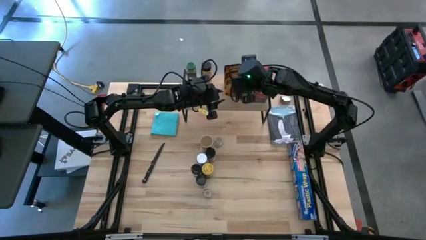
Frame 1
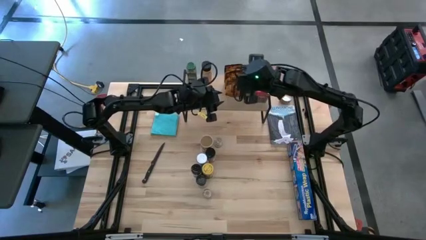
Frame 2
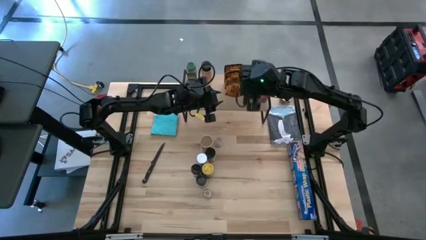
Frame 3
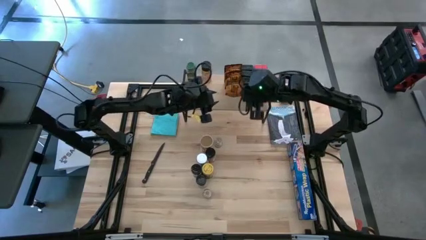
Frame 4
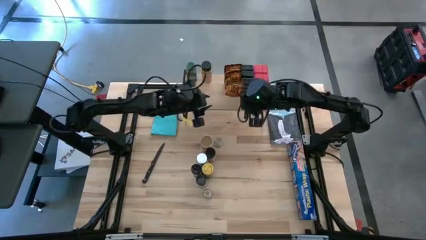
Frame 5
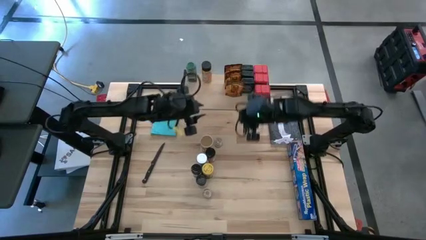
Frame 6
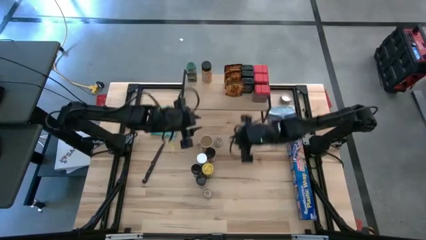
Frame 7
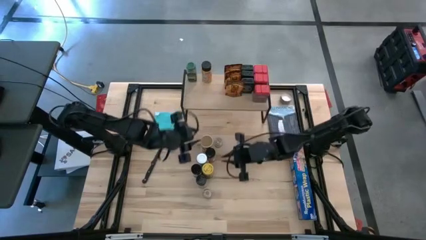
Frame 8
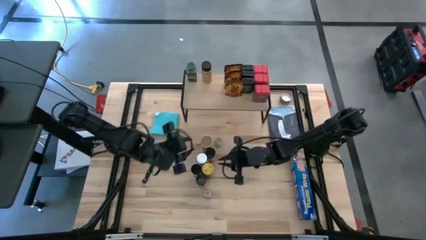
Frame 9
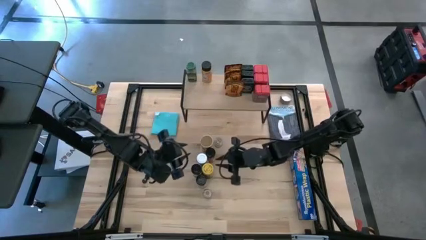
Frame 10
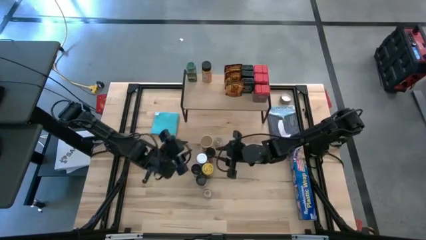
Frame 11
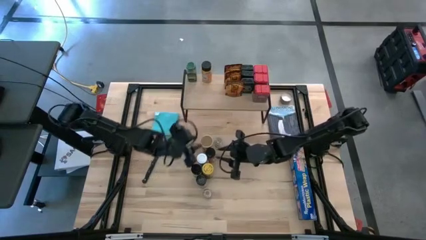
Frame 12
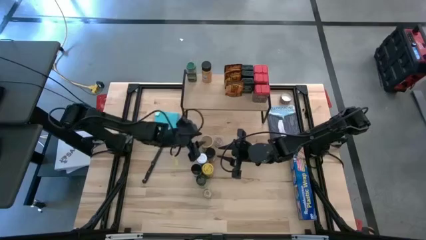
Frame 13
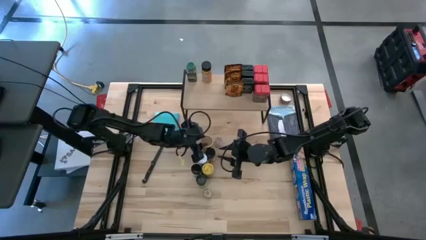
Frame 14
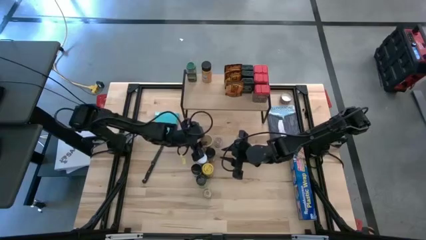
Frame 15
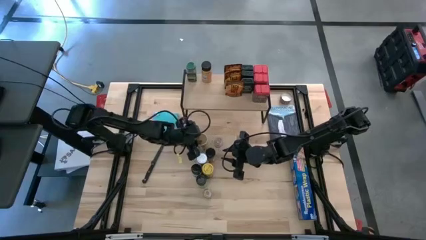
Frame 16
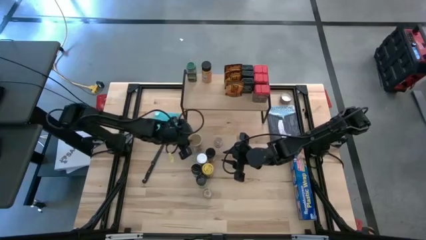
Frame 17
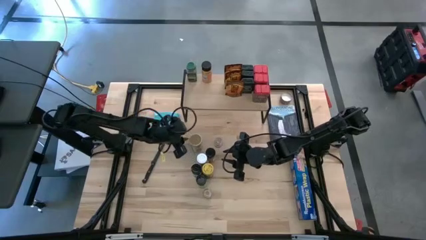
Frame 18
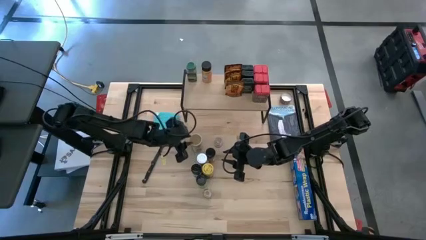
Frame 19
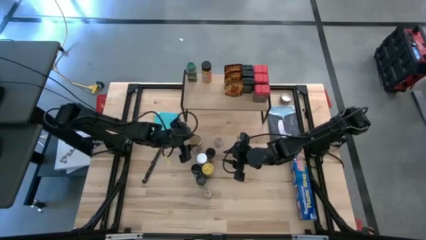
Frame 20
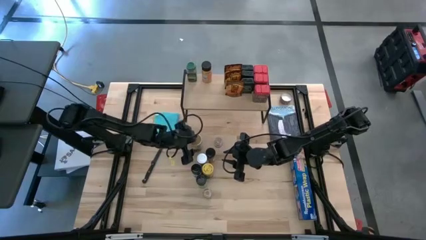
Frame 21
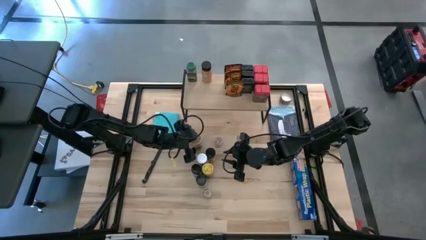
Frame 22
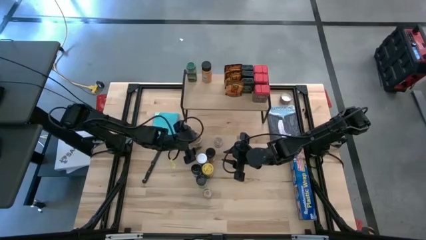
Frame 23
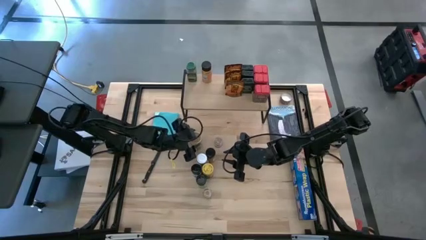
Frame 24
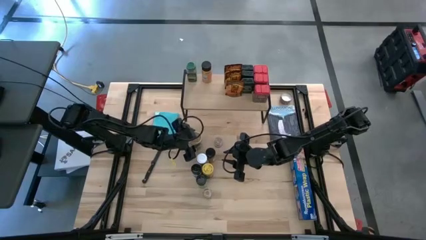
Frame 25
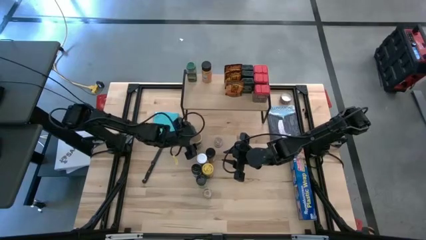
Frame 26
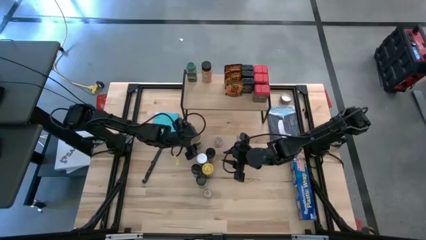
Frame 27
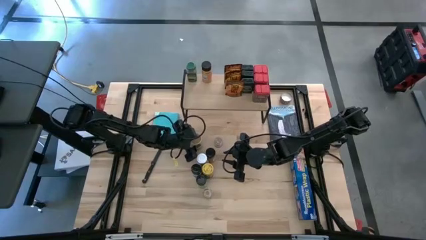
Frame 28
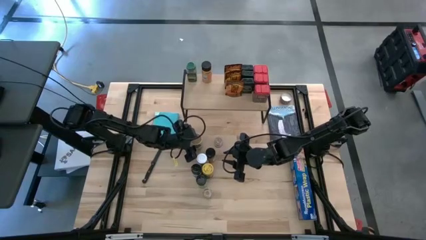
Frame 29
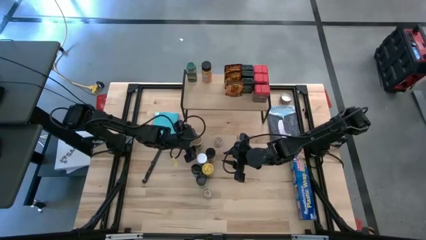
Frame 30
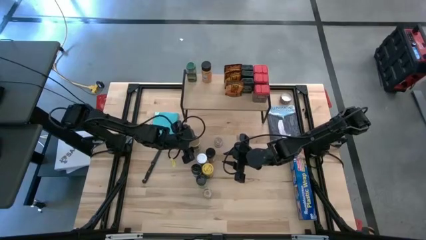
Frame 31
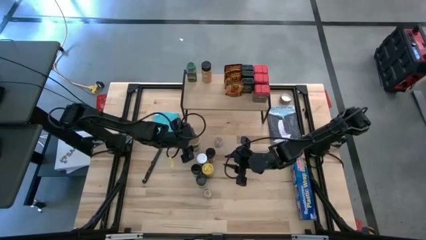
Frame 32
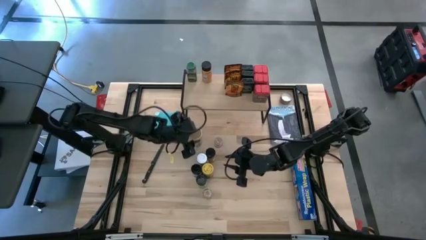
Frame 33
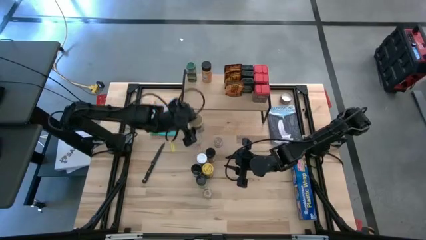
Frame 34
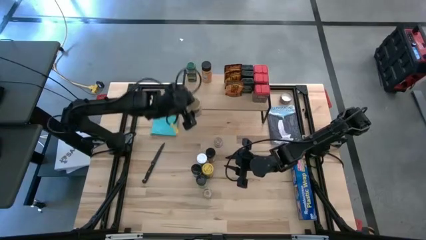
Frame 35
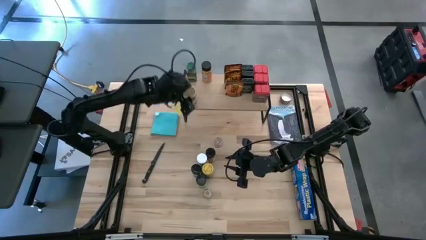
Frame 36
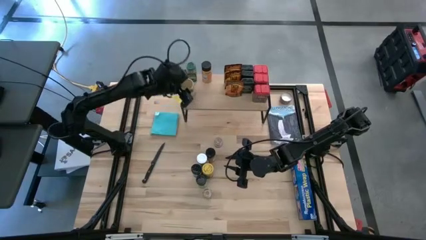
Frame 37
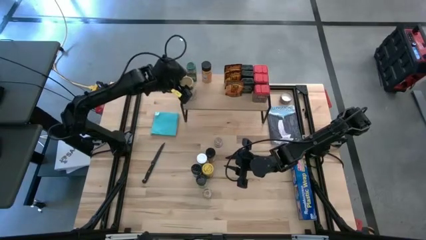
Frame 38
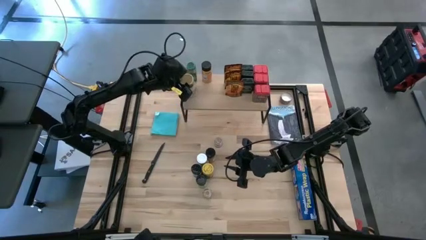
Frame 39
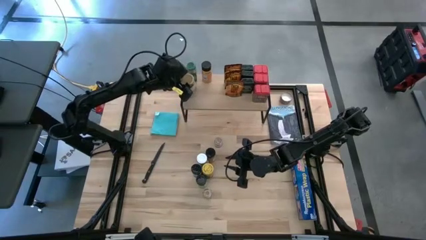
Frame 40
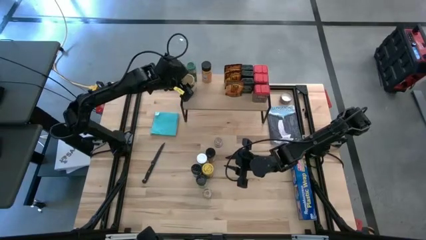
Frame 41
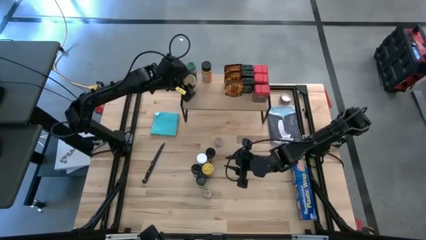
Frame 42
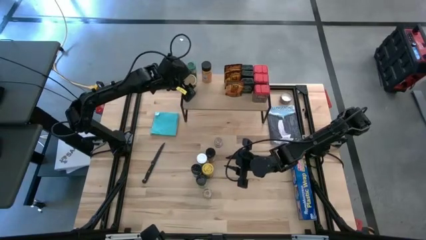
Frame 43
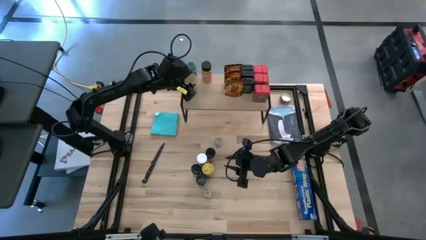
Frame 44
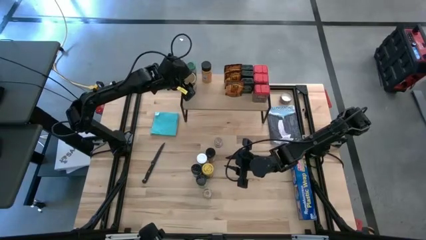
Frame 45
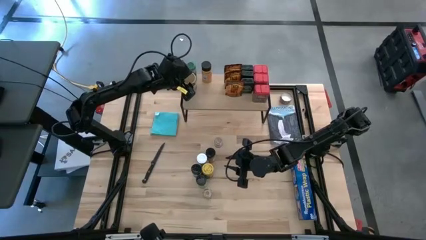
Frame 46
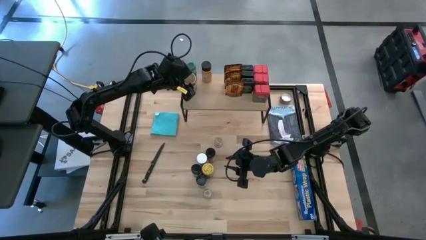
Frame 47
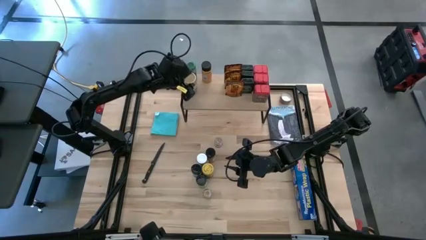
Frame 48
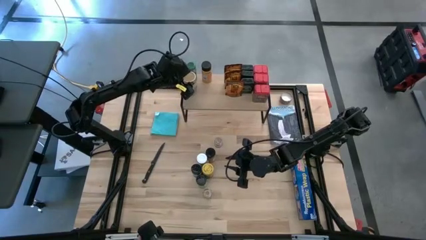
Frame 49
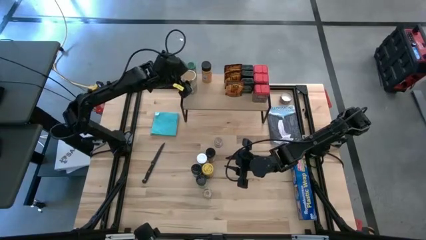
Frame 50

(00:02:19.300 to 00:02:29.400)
Task: Shelf spices
Put the gold seasoning bottle on the shelf

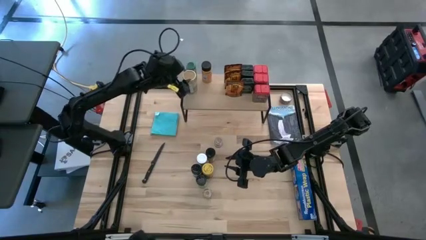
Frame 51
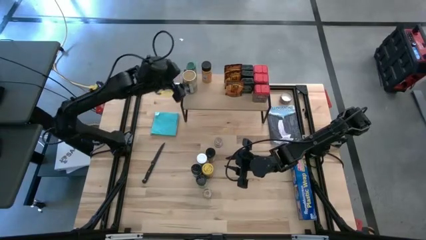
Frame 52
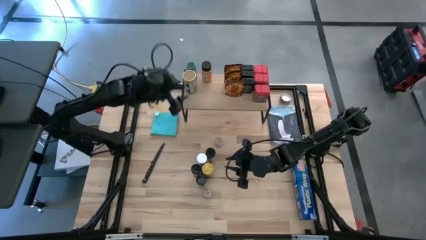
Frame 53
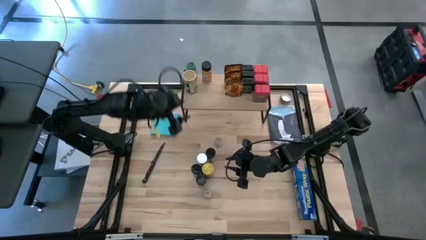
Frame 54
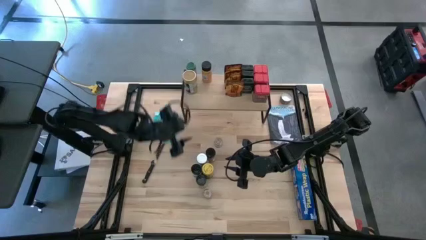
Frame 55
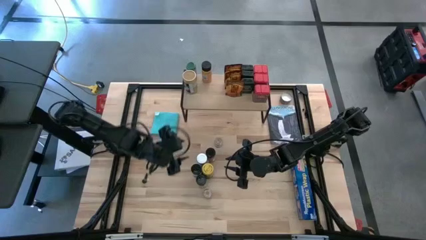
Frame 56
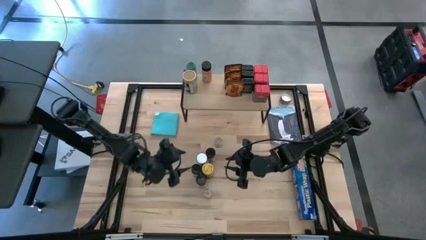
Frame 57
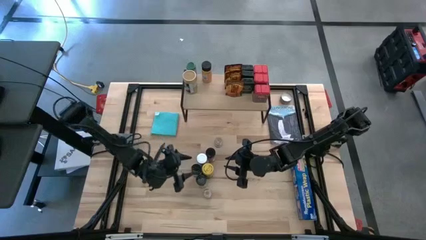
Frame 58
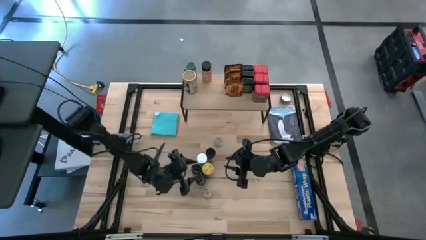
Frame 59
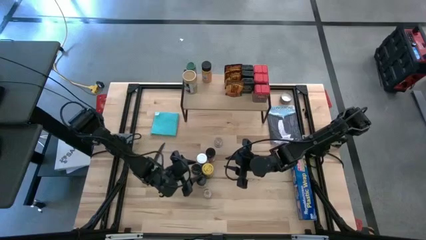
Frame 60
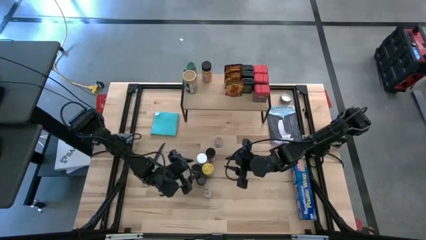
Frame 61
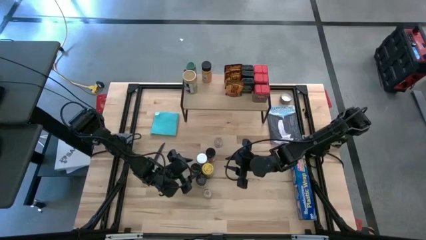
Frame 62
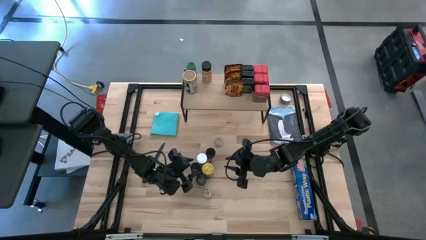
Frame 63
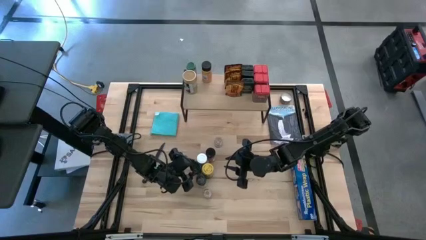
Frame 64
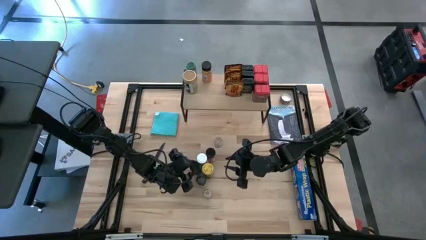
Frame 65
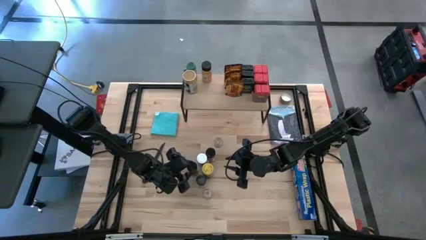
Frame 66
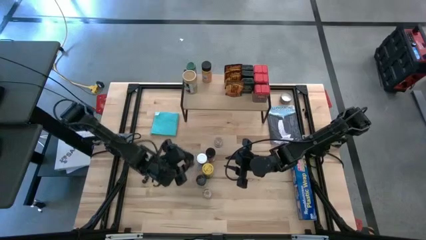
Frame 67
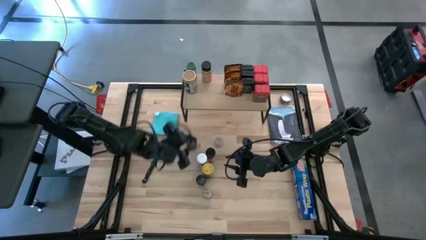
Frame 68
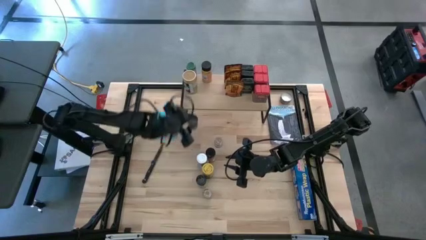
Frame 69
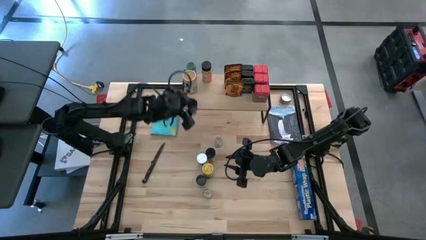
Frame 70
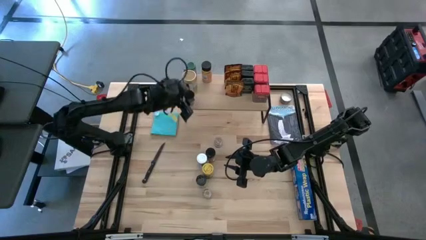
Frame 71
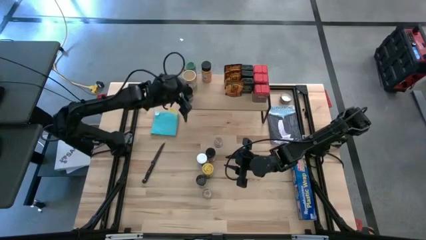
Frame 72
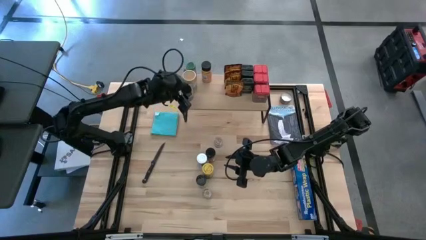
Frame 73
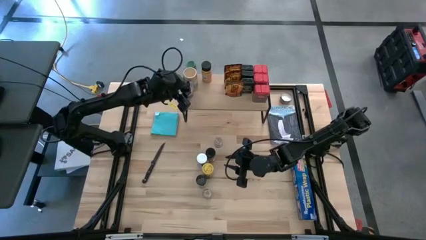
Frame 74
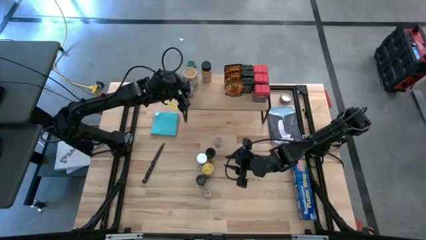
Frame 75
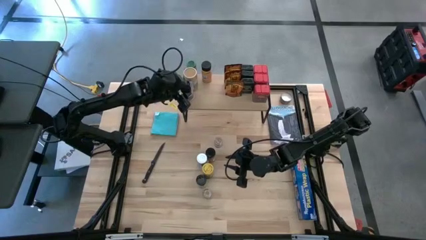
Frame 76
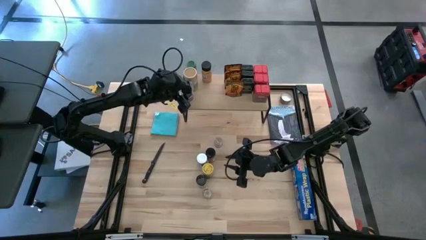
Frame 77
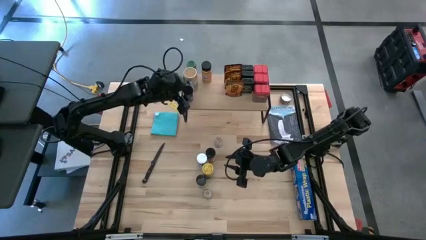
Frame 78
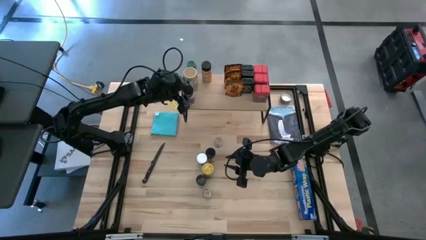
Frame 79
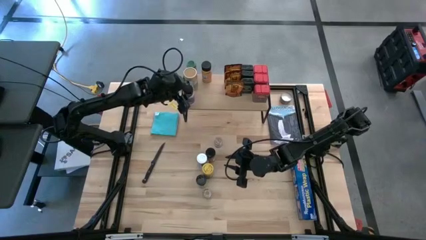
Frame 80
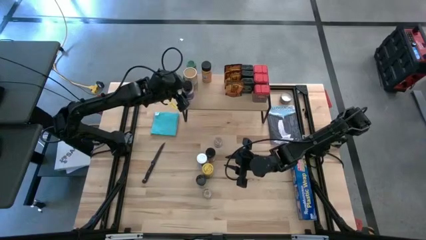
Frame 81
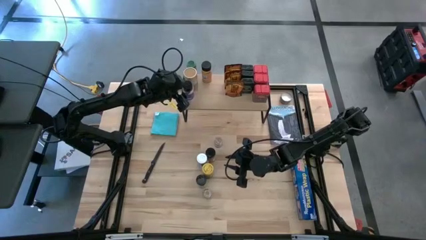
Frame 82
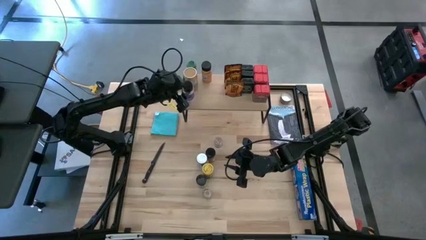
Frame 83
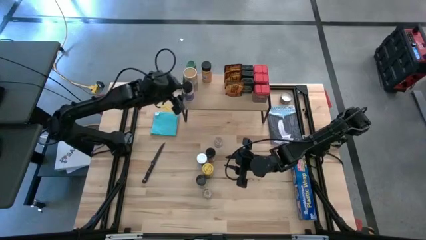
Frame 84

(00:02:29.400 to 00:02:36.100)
Put the black seasoning bottle on the shelf
